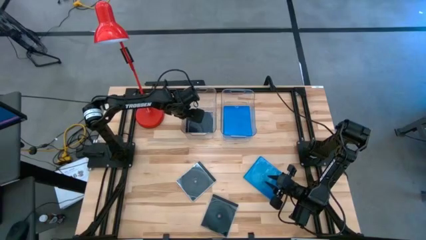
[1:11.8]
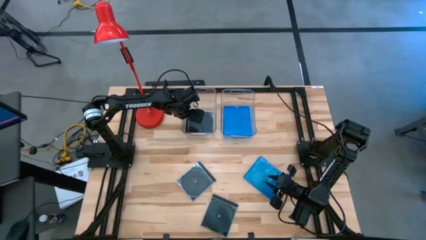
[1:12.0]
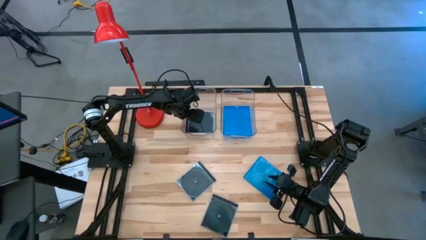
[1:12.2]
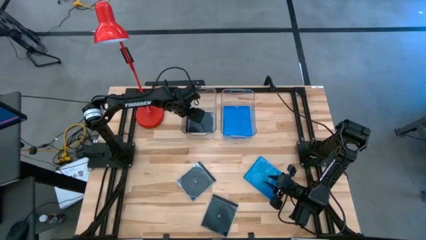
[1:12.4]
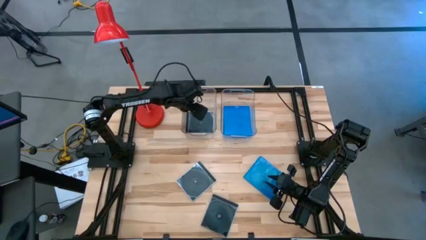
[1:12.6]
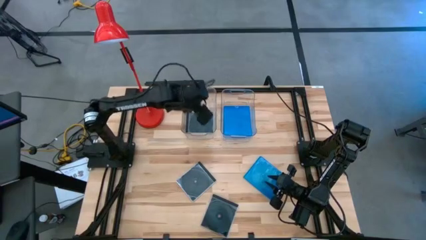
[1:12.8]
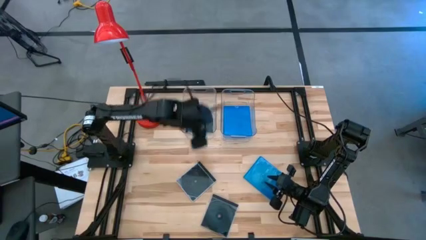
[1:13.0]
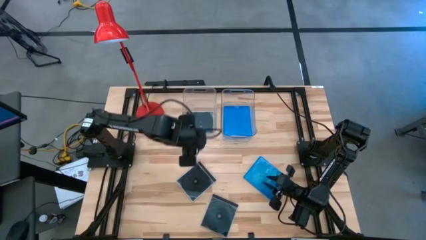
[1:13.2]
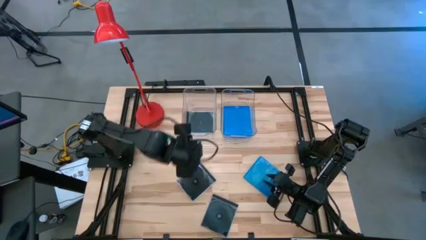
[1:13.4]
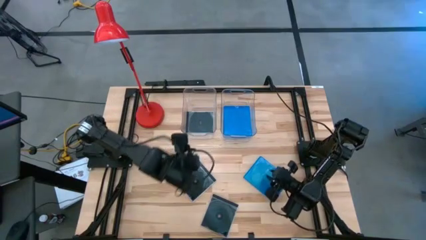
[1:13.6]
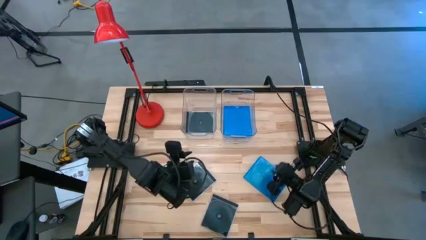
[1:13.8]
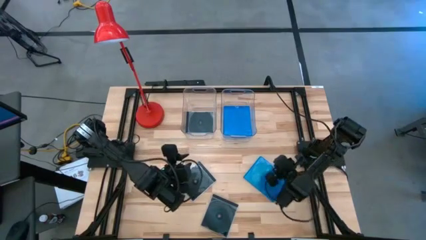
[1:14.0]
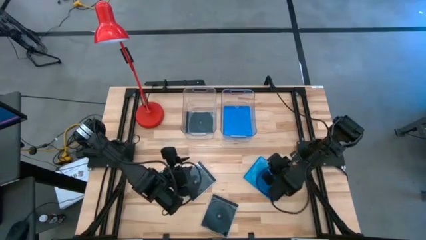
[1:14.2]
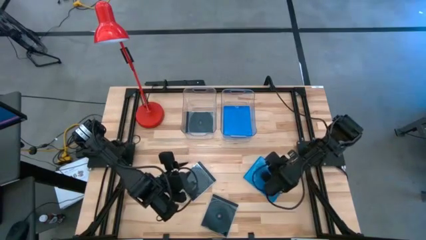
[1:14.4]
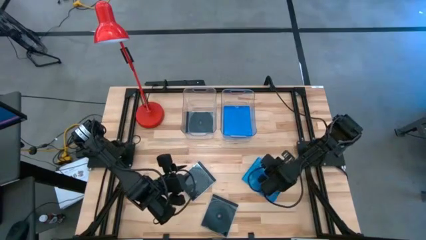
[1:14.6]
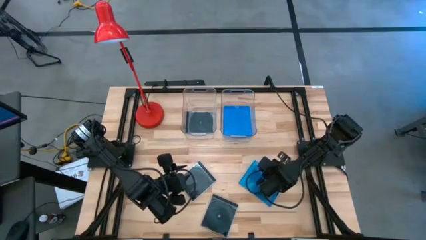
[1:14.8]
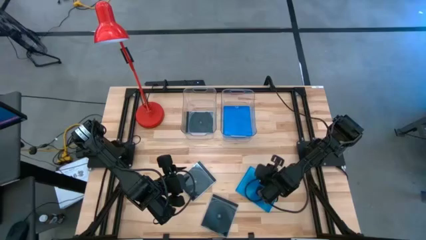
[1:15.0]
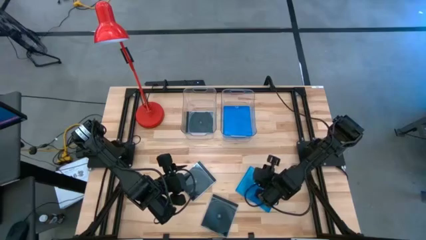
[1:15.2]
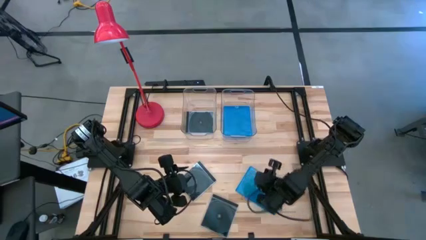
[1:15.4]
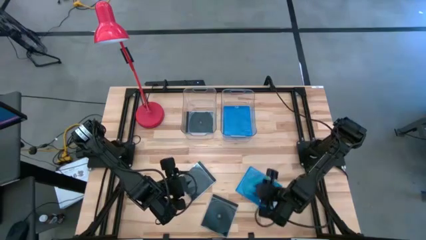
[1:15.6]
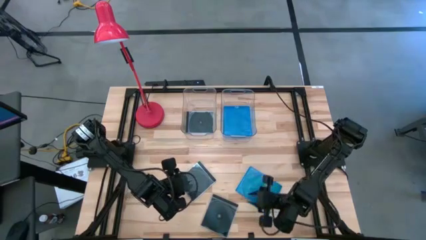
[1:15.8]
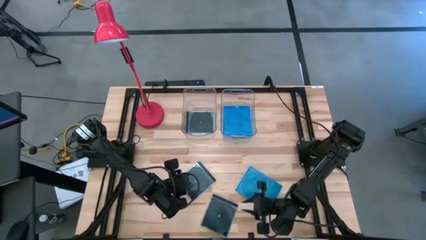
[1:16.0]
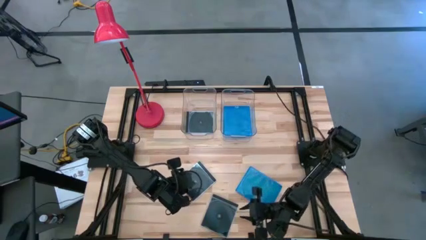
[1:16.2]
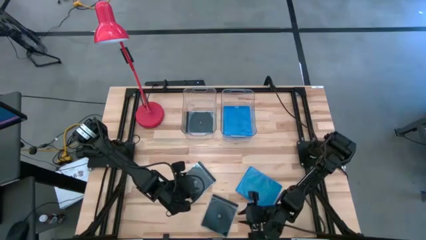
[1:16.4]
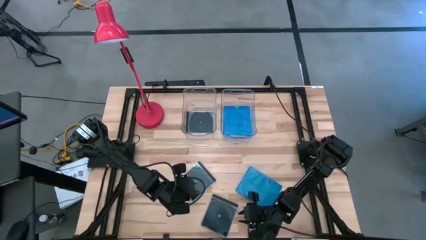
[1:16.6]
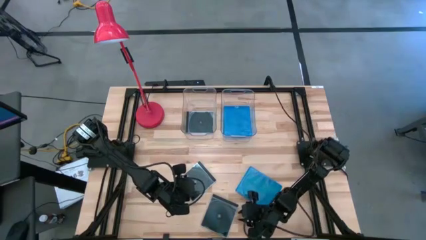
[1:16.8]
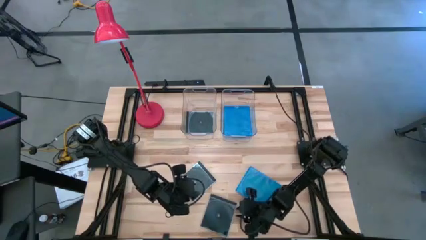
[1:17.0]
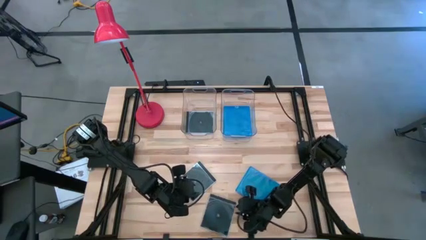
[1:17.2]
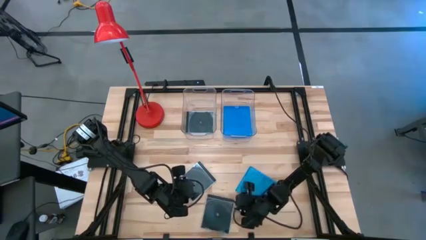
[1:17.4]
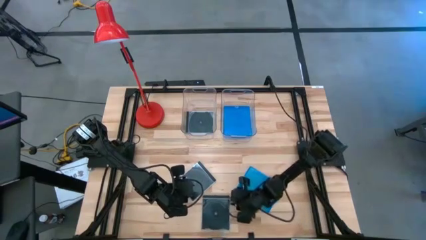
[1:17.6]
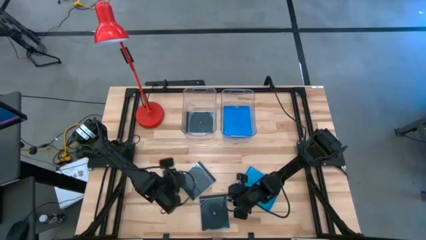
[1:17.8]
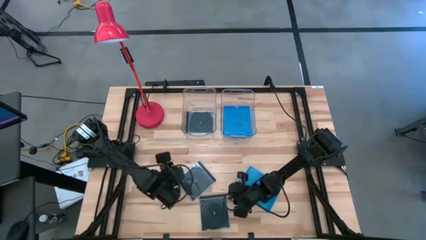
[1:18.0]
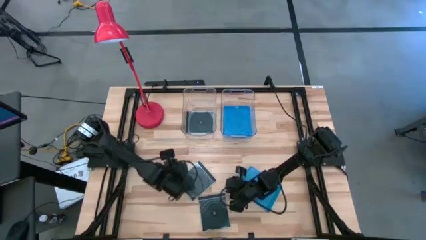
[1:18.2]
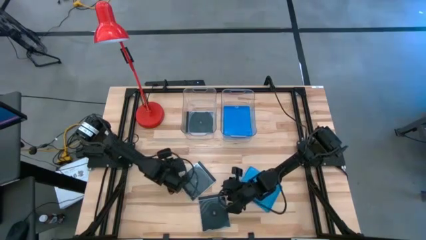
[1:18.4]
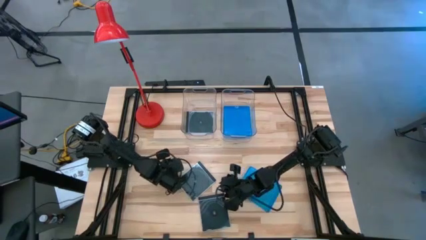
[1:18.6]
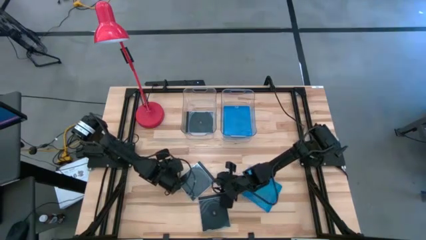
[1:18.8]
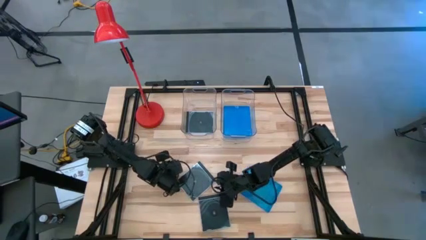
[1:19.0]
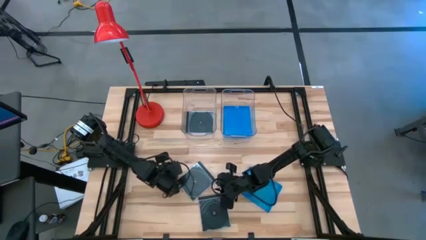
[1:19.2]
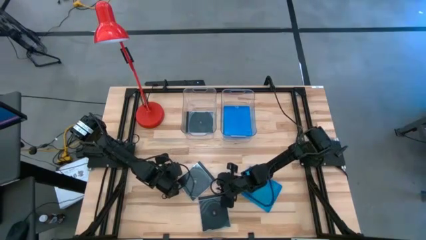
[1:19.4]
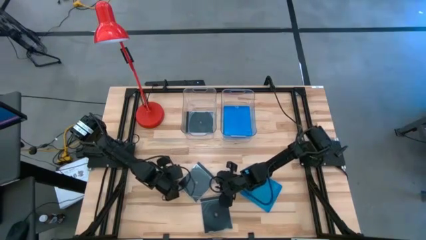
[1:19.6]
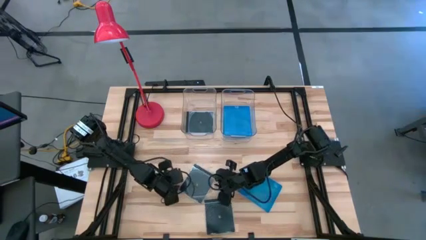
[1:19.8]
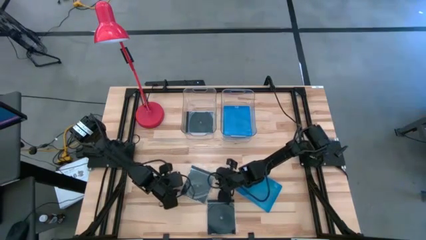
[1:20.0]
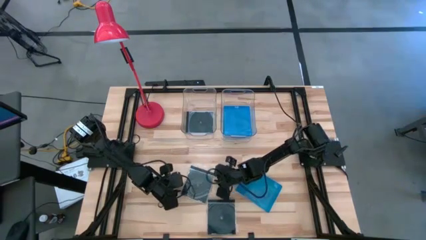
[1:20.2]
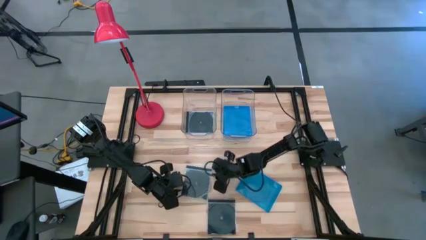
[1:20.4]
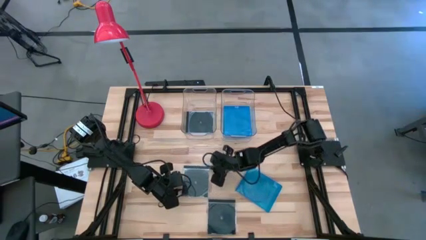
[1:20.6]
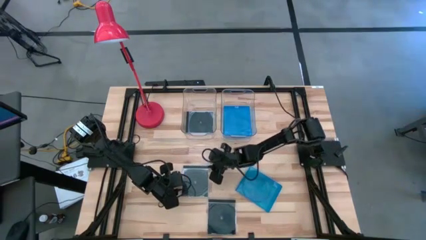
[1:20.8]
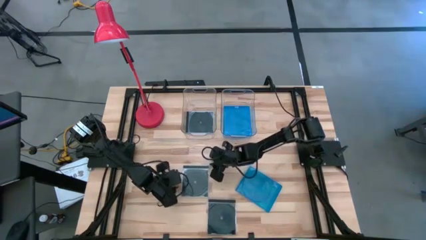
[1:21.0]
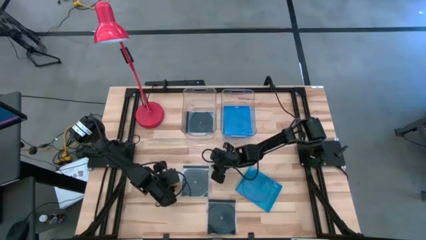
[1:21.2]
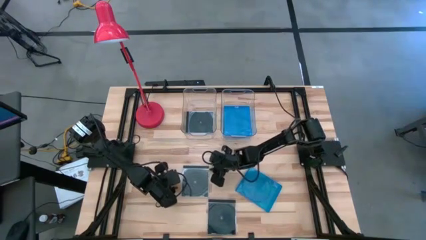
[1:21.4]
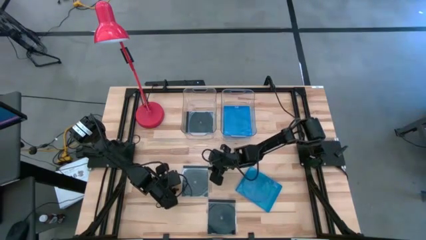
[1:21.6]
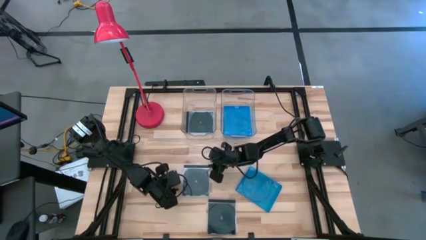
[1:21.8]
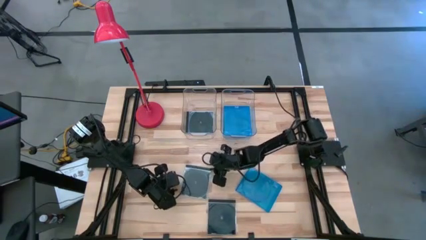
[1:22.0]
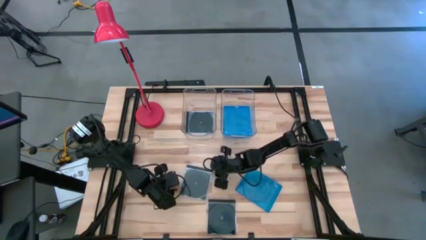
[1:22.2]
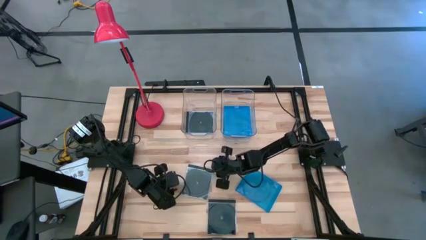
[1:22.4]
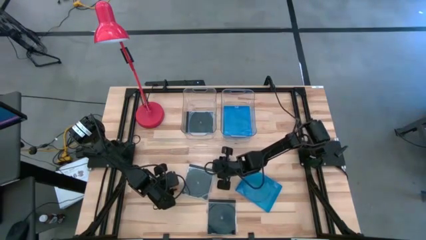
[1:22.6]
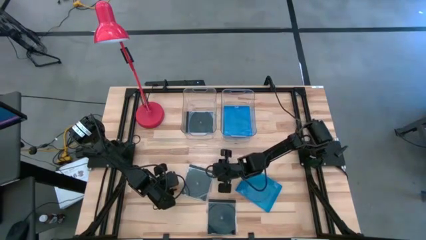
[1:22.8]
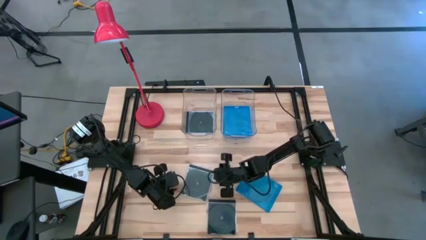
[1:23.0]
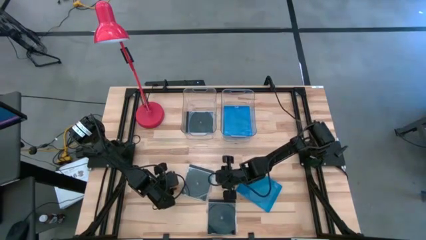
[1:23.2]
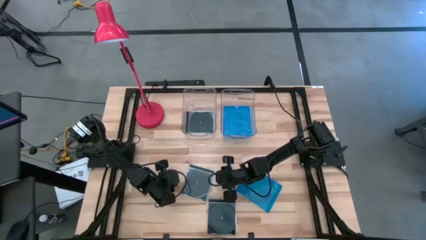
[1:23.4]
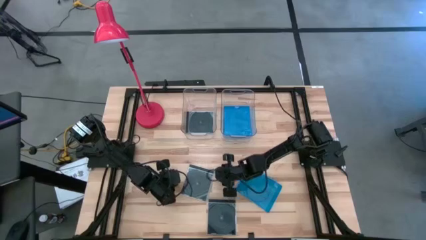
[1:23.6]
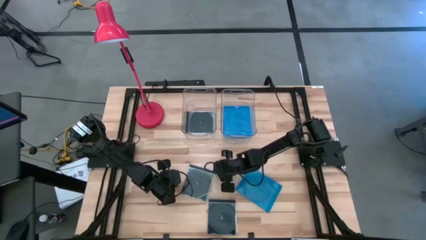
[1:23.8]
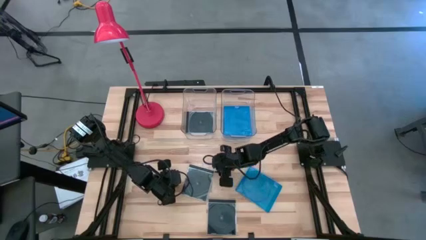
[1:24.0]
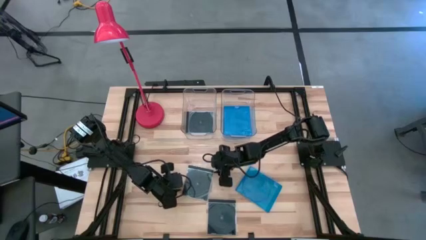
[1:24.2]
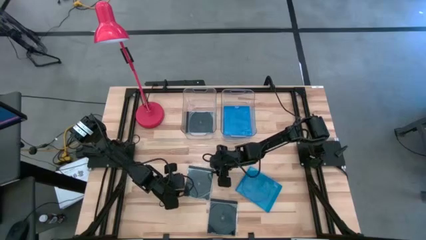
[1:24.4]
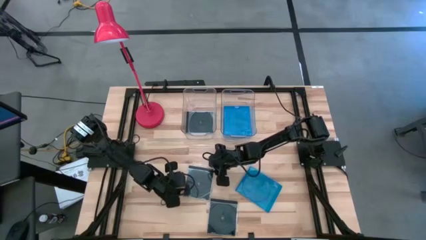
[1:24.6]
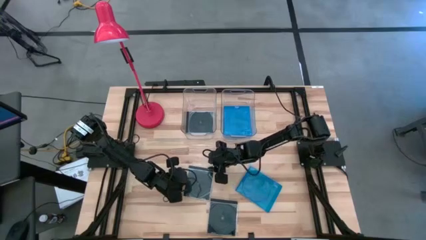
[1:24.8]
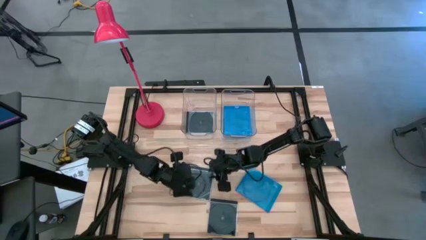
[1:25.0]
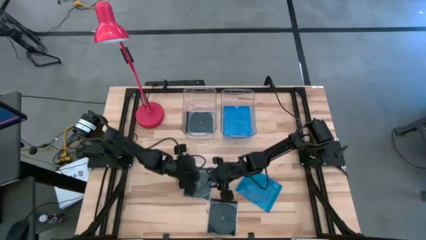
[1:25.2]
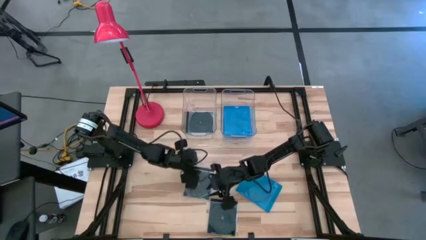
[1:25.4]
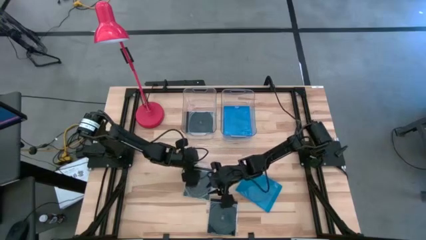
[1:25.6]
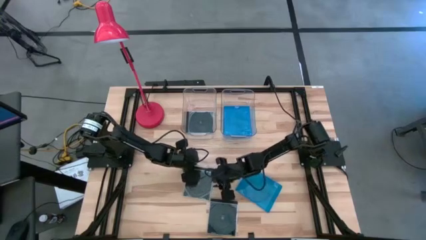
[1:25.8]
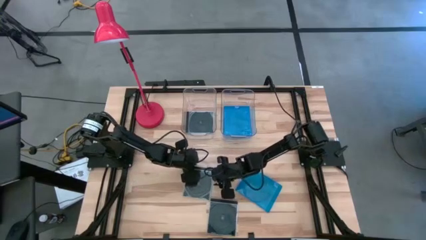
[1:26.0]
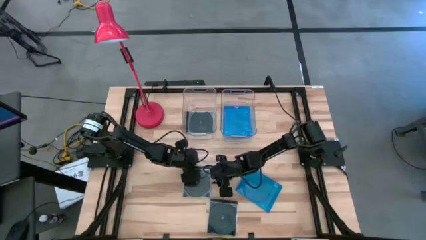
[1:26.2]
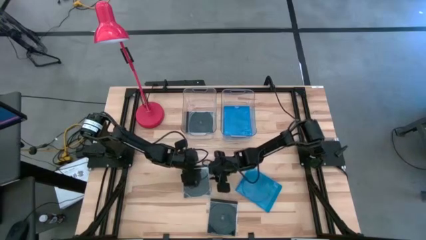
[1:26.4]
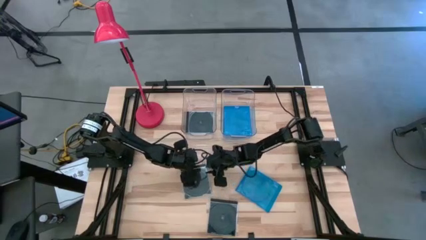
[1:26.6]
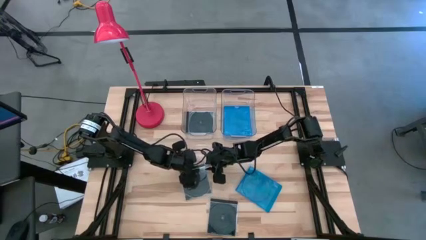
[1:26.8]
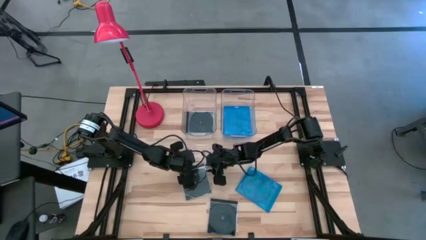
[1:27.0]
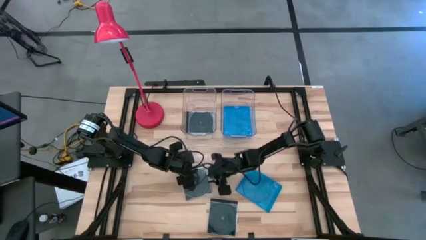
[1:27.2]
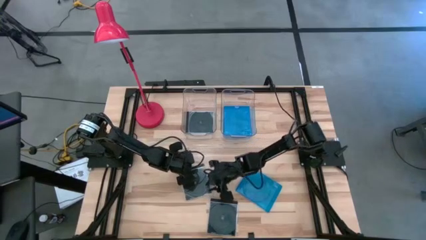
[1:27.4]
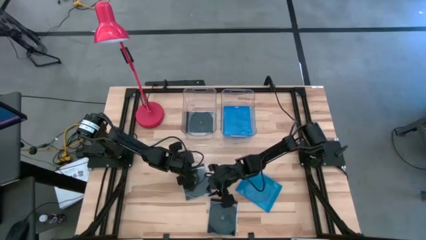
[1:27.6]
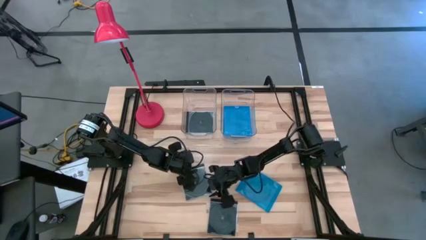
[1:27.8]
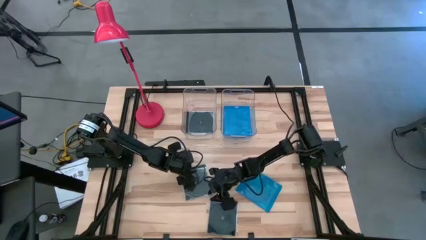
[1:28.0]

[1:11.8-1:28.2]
Task: Pick & place jewel cases by type
Put the top black cd case into the left transparent bin

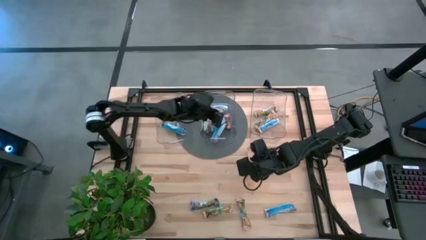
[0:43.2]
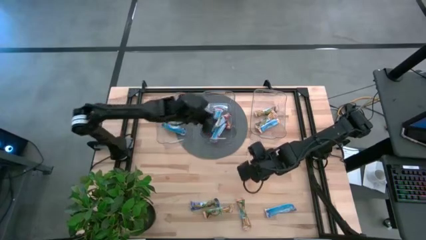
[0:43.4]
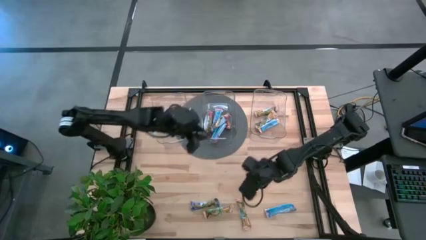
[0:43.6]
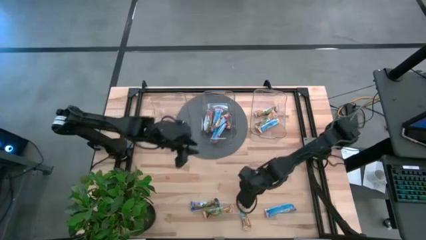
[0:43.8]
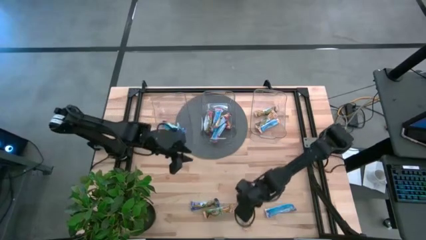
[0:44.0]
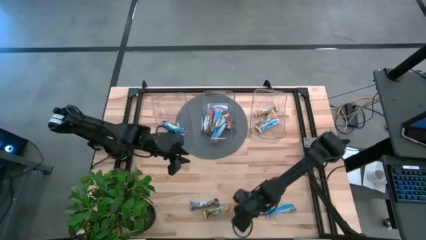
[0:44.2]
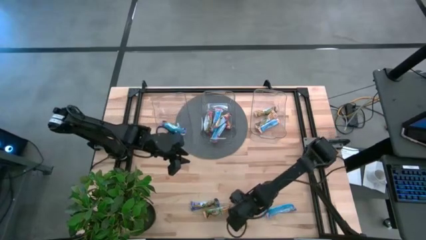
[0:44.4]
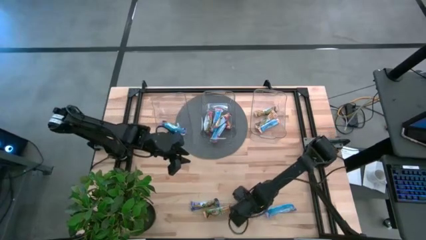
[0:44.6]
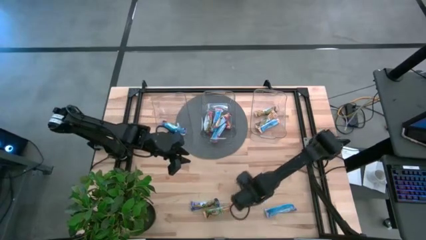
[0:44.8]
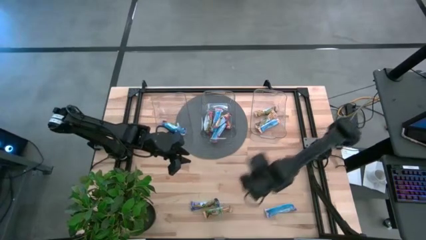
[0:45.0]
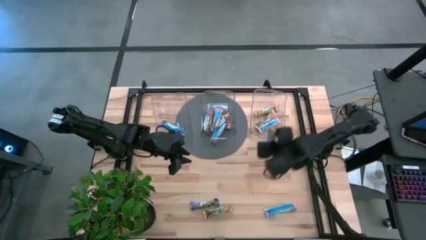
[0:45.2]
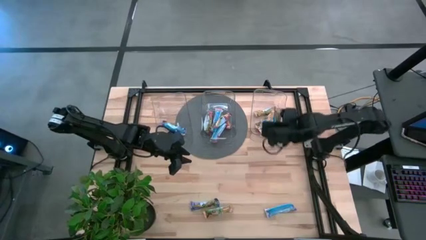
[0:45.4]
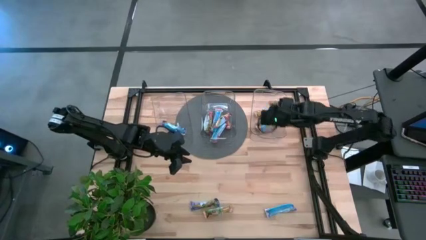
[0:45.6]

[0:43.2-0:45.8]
Task: Pick and place Granola Bars by type
Put the yellow granola bar into the right transparent bin
